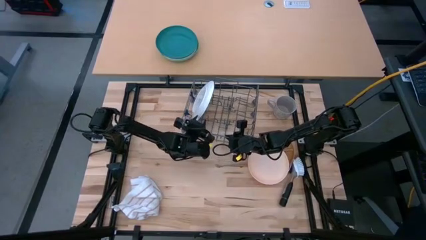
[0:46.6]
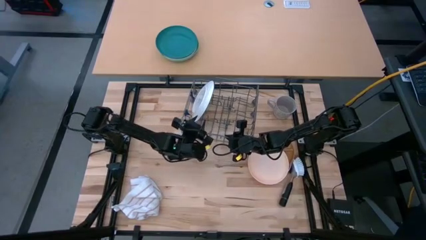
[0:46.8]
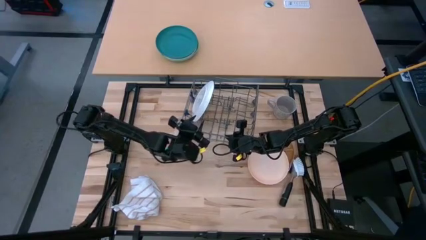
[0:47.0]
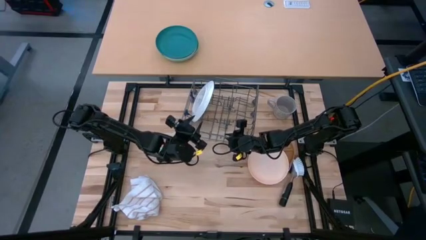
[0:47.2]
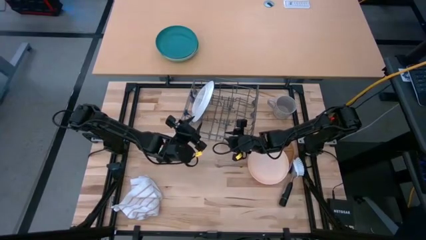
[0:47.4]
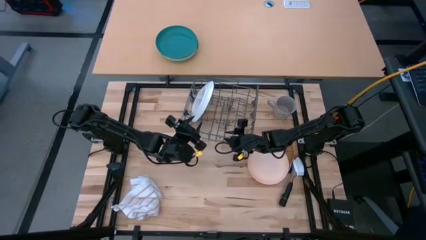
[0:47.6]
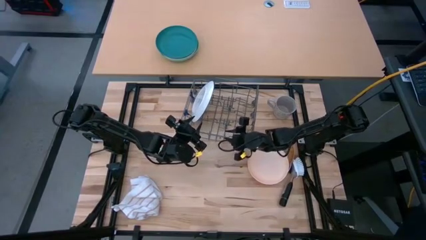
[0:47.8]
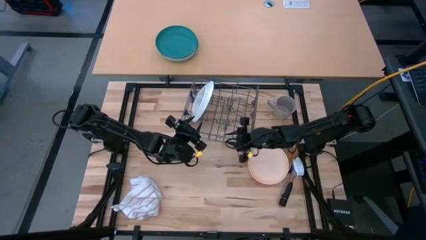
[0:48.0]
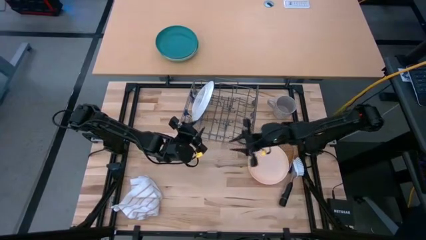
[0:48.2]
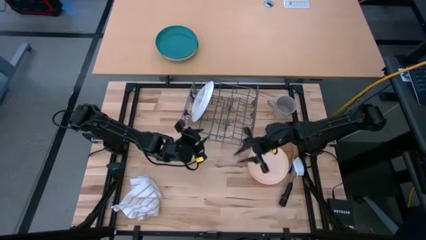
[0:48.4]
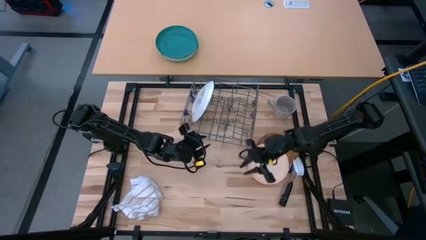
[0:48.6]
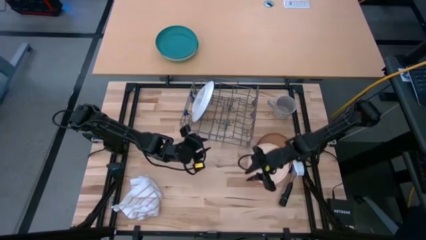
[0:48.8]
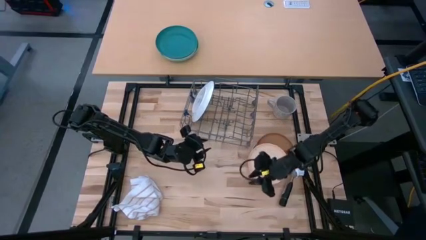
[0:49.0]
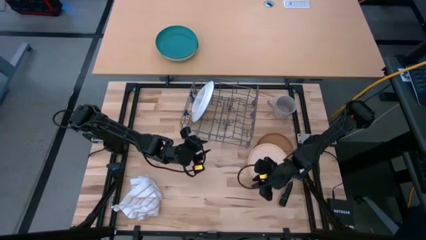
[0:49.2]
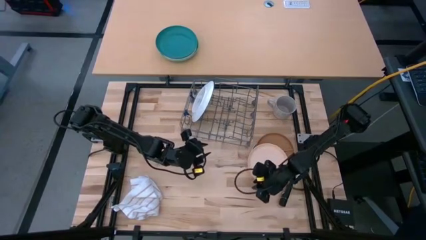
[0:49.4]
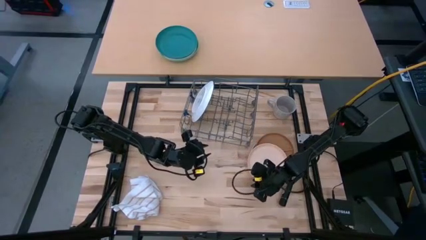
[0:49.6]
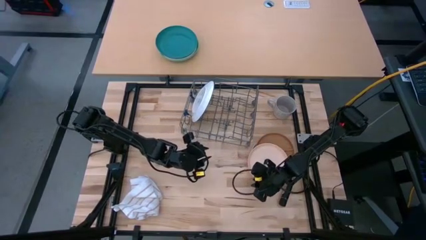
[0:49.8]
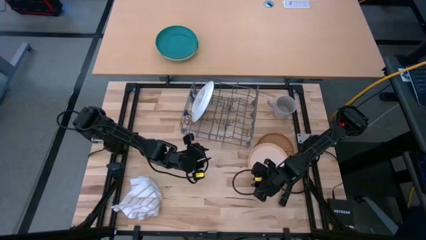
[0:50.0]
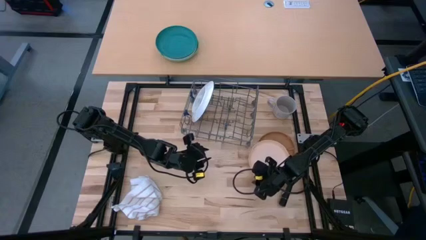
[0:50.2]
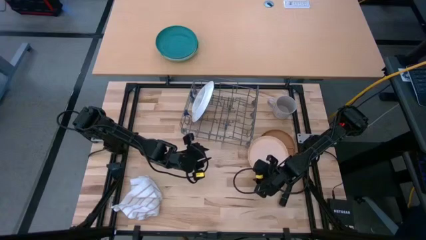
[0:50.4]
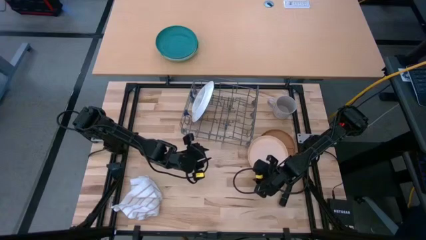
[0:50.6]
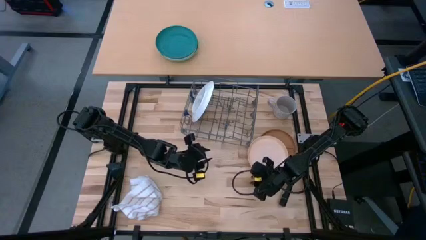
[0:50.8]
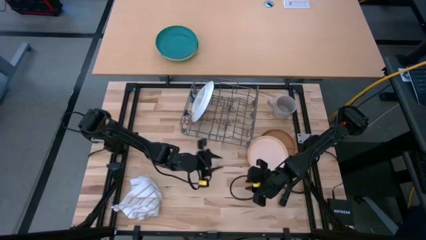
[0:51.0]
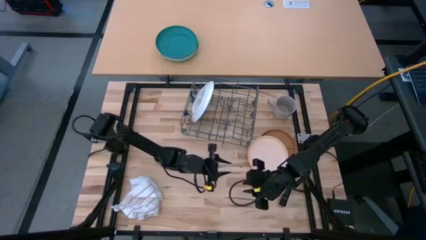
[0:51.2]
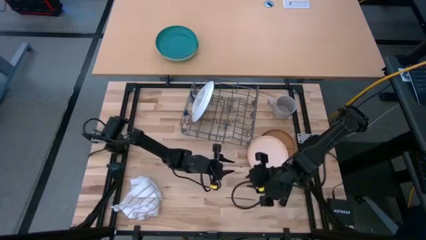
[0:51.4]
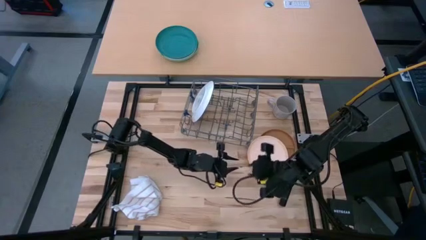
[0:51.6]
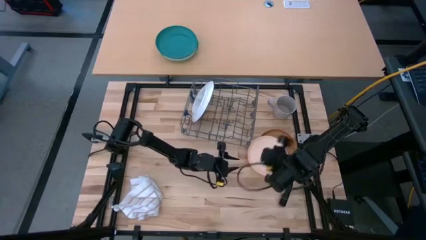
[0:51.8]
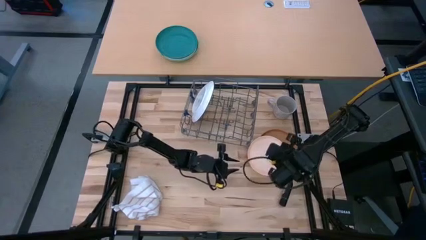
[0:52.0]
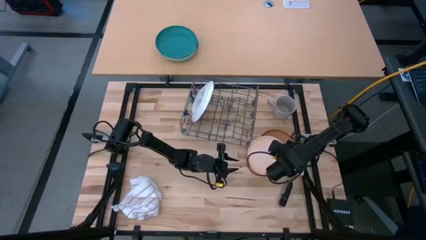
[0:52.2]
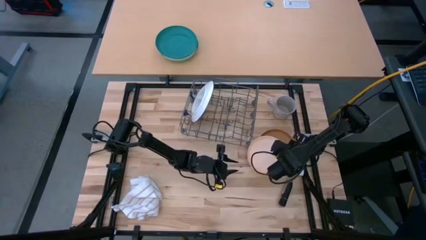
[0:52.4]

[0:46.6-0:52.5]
Task: Sort dishes
Put the light orange plate in the dish rack

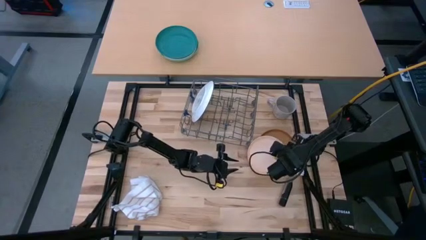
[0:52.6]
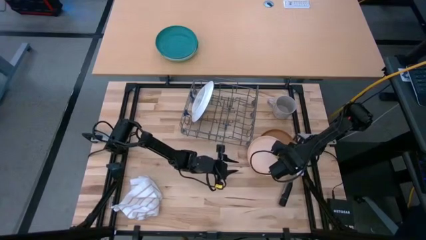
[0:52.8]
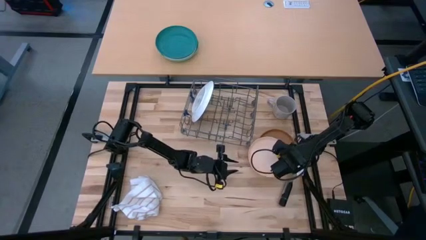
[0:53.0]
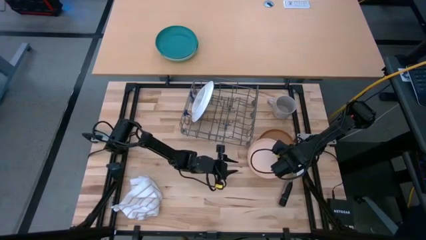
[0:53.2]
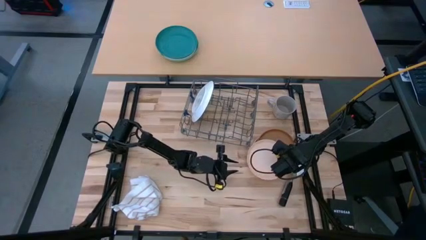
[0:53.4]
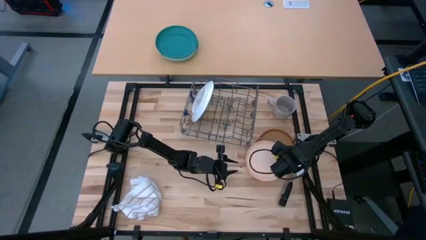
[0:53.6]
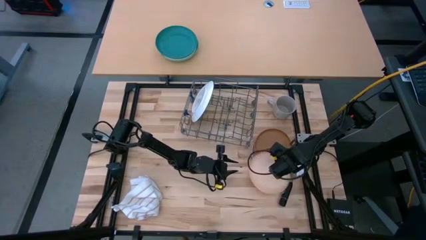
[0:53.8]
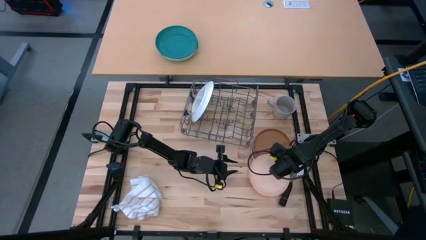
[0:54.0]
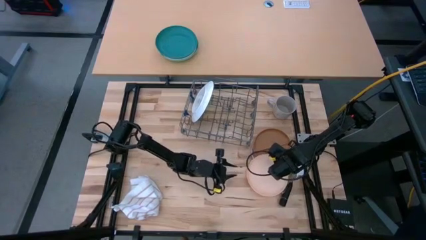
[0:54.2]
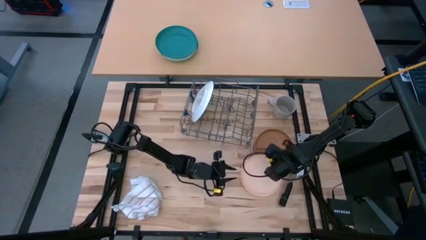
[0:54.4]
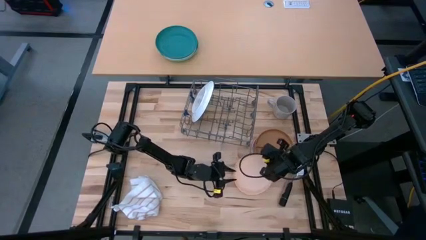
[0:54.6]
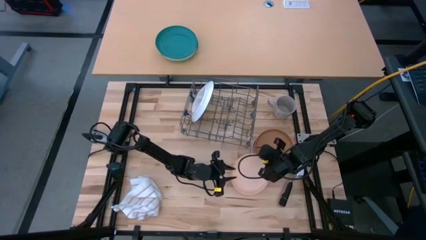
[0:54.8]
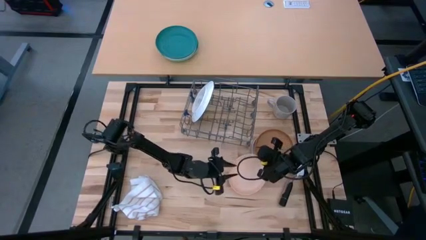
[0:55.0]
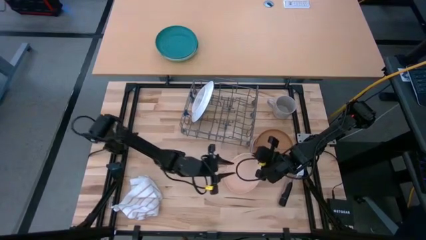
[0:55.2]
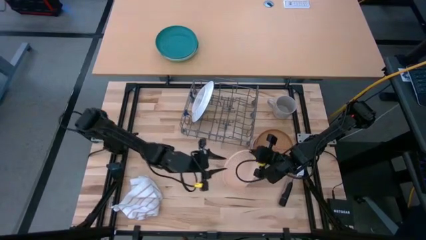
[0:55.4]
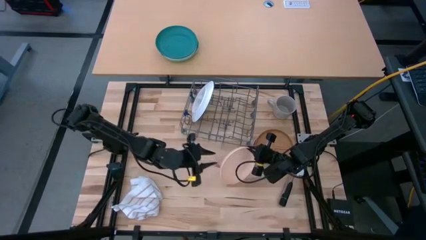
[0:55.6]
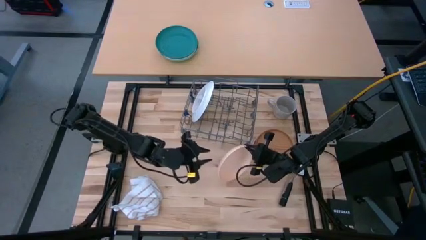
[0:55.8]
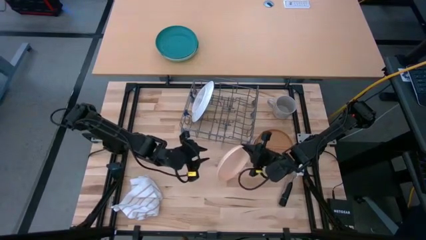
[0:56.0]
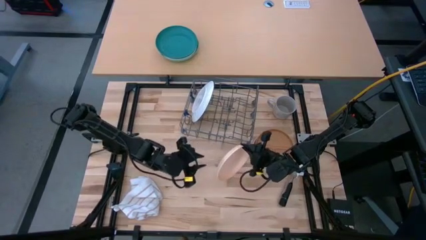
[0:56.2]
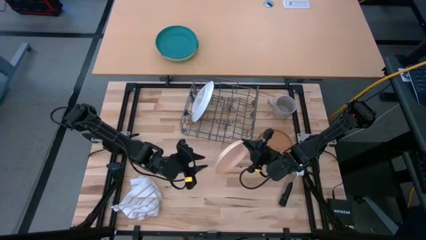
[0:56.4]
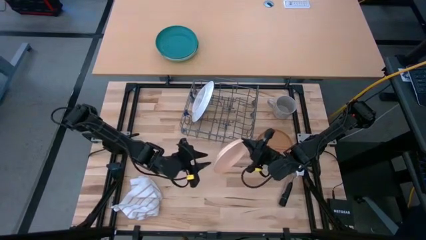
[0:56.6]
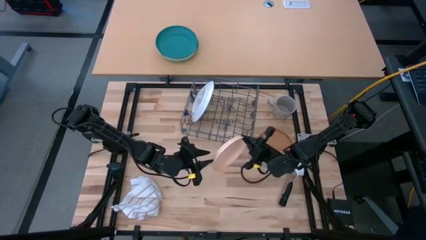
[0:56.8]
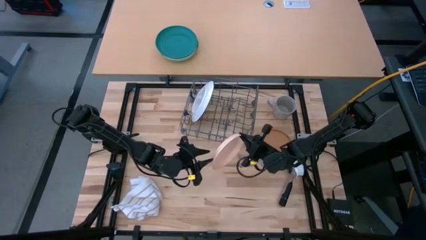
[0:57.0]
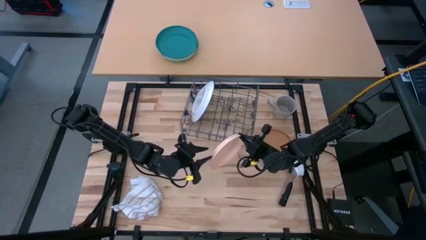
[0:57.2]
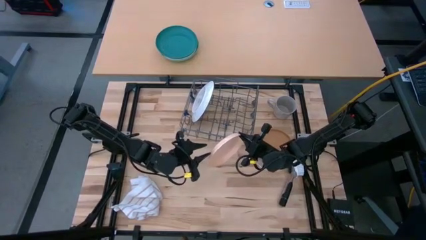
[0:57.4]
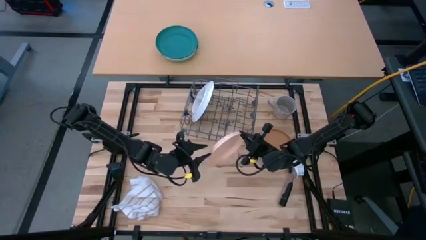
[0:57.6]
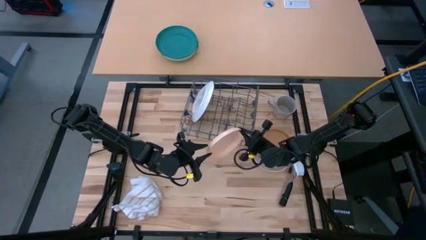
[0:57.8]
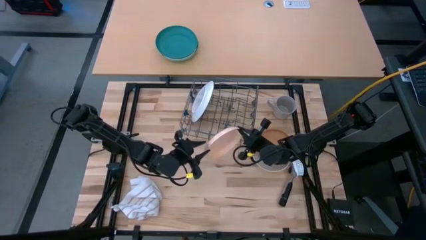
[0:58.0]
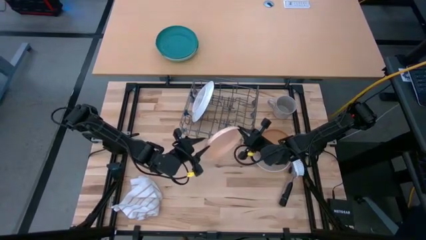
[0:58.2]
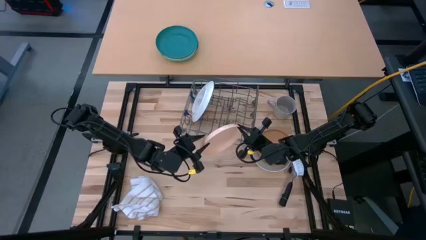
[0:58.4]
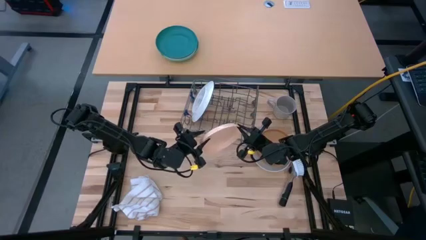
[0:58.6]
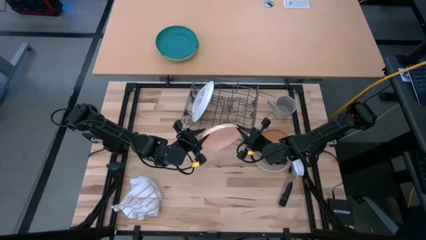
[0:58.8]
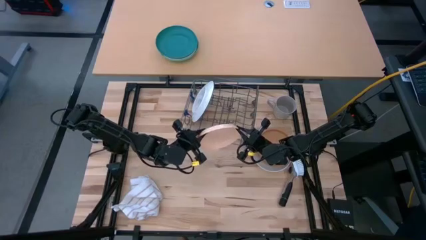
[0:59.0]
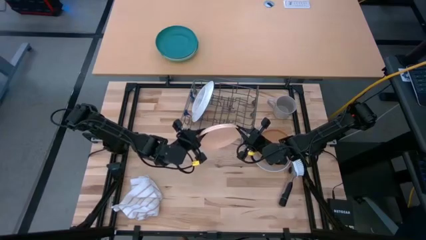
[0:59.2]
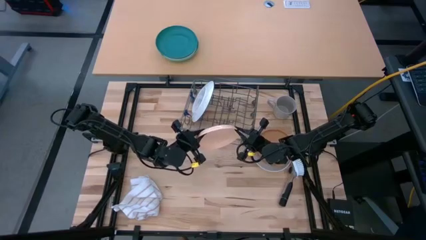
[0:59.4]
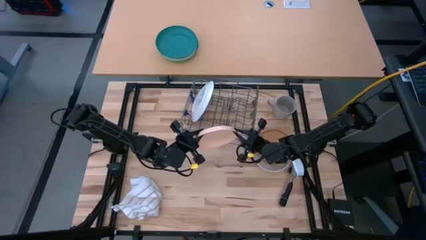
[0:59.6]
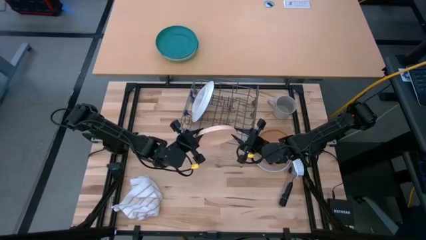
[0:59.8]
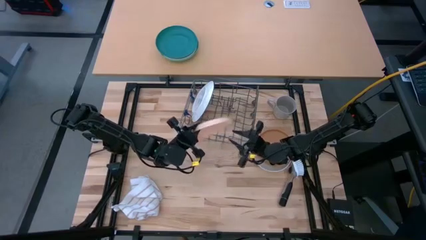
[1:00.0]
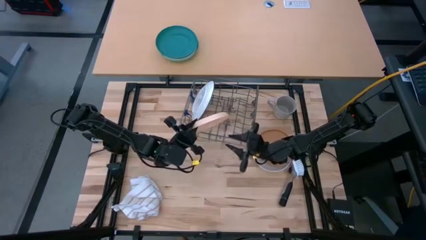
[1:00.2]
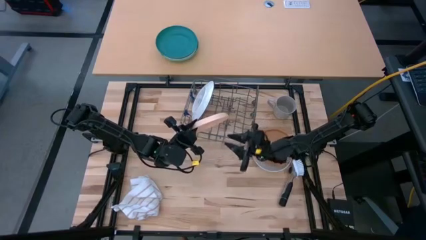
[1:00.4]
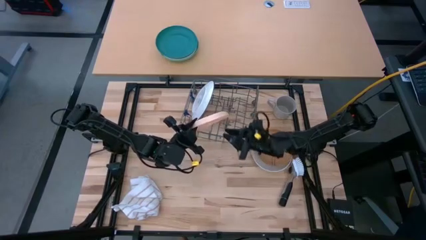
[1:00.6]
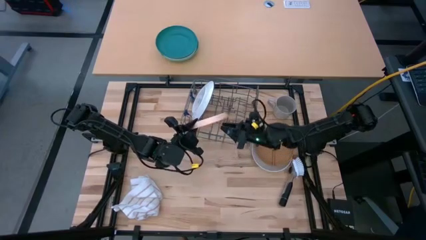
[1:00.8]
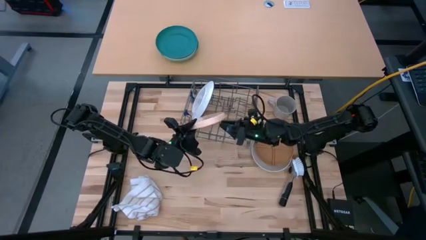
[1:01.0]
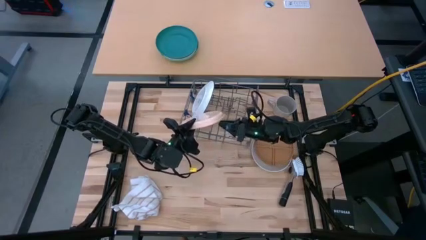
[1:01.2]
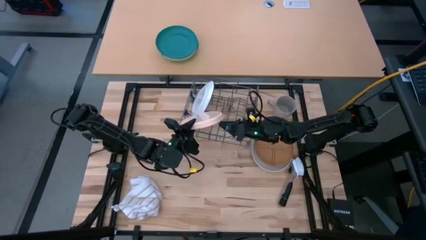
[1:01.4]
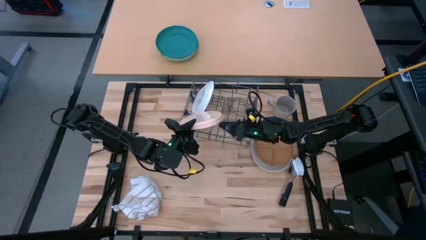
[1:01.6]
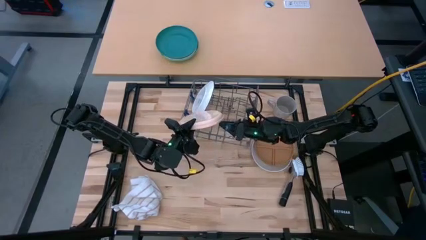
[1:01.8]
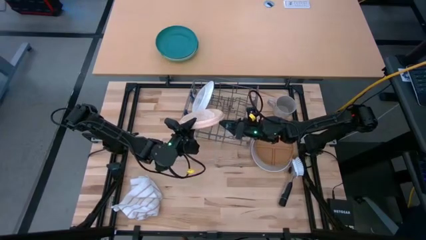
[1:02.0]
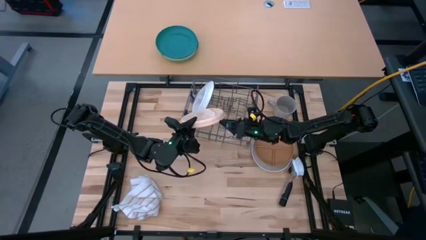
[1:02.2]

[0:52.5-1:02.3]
Put the light orange plate in the dish rack
